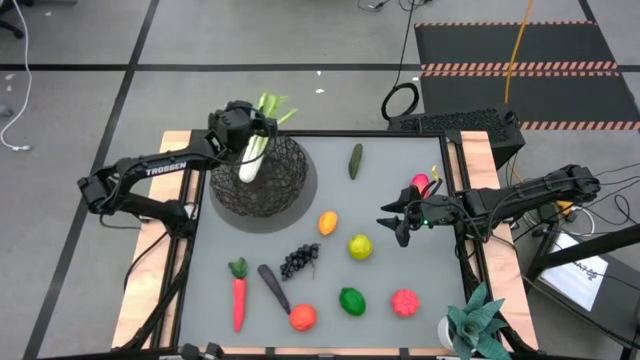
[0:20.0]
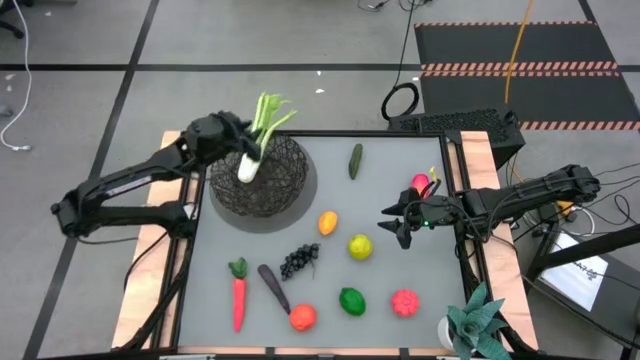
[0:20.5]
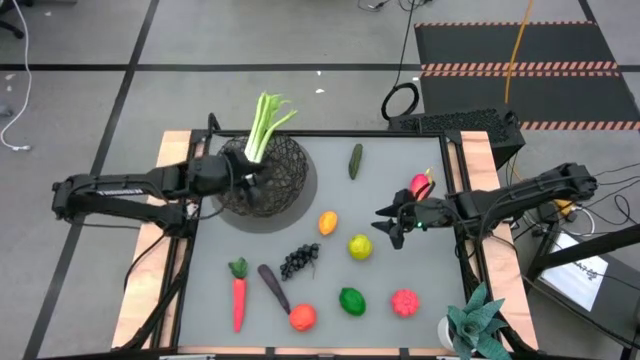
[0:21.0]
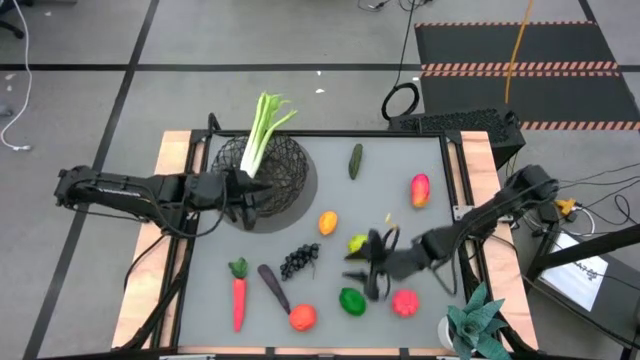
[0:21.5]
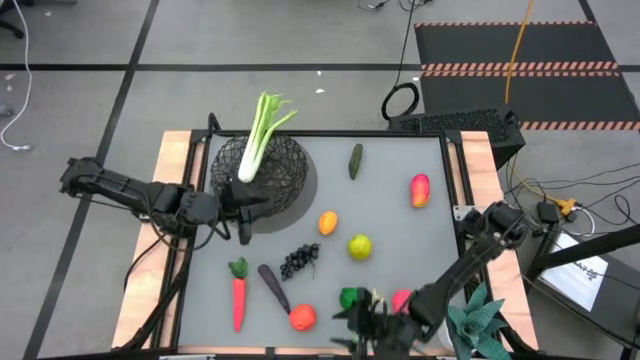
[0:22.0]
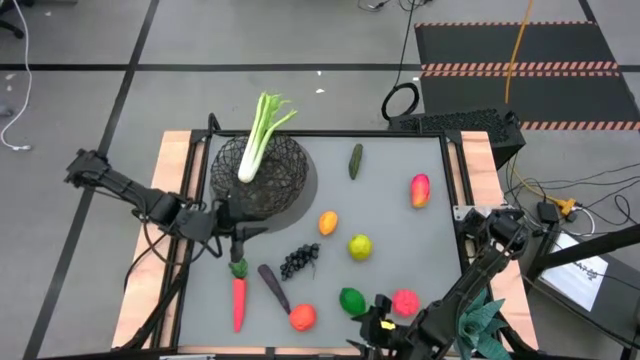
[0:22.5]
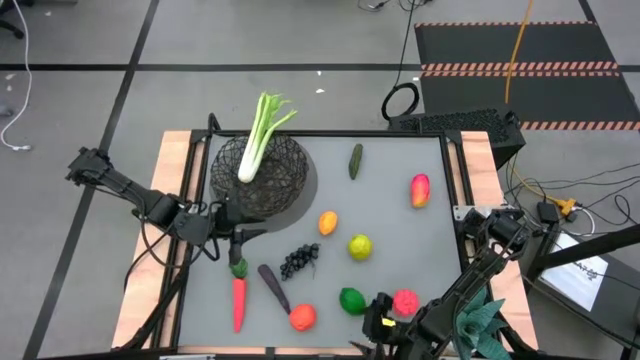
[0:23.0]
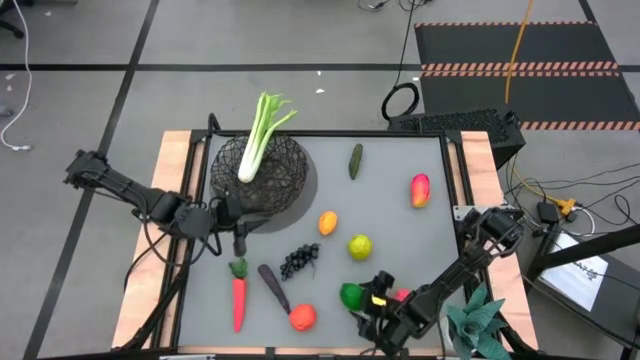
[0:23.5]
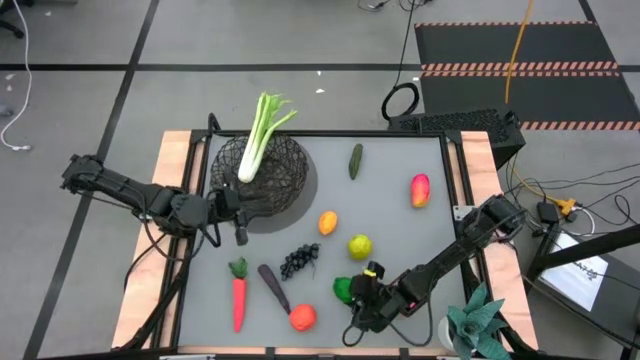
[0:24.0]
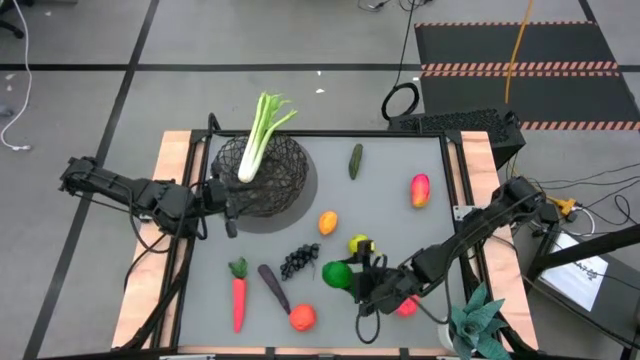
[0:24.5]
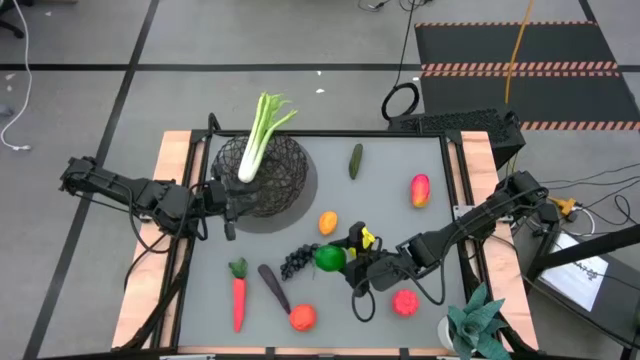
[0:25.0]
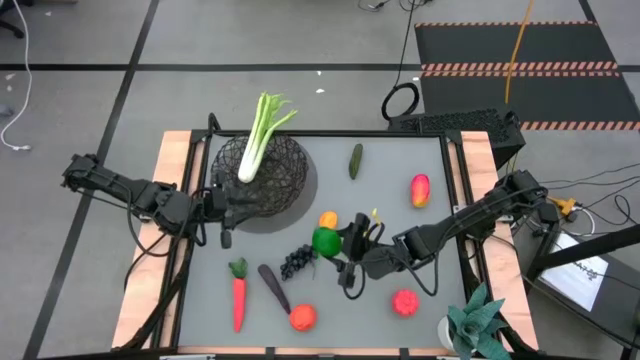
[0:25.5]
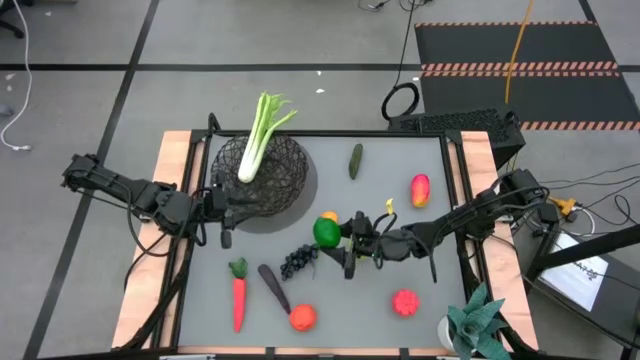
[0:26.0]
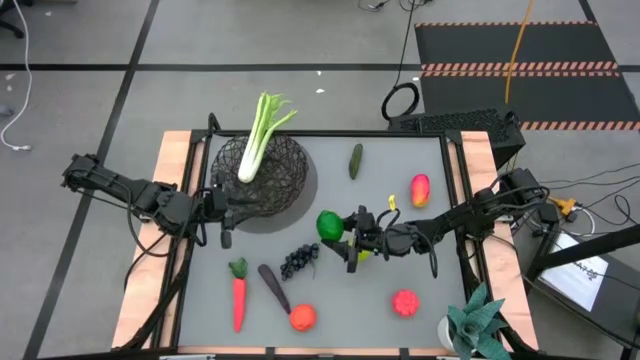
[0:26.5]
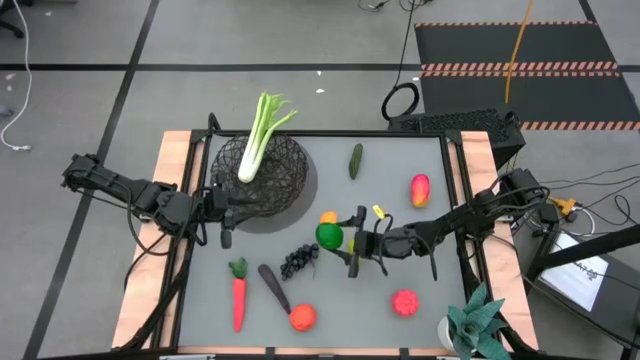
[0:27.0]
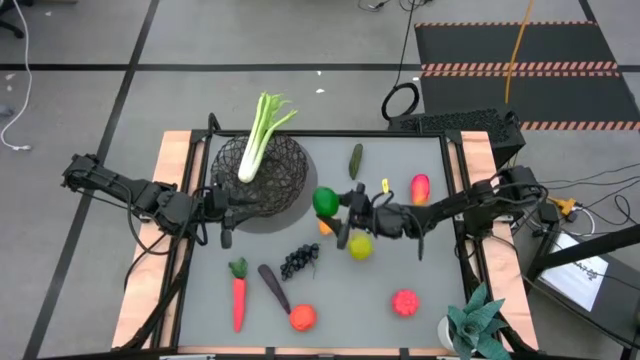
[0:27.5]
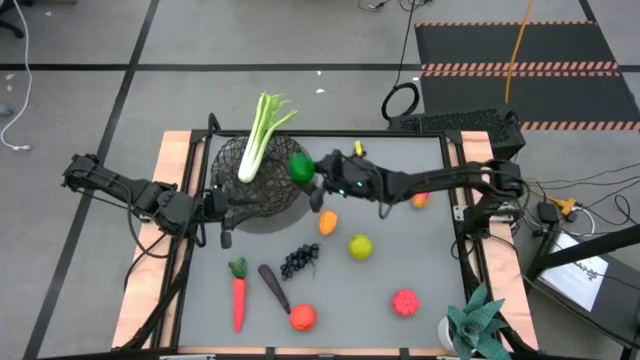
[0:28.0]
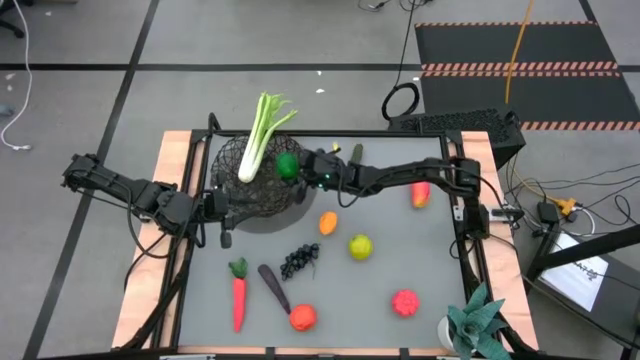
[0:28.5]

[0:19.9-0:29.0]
Task: Build produce basket
Put the green lime into the wire basket

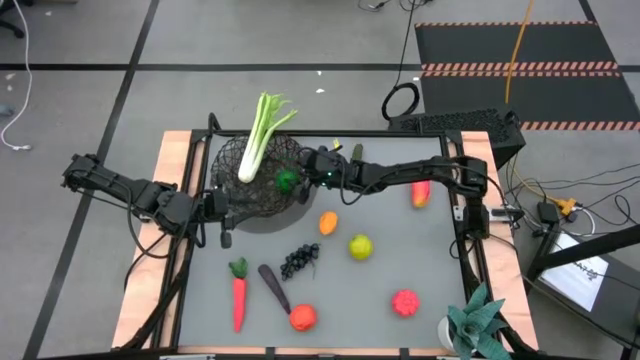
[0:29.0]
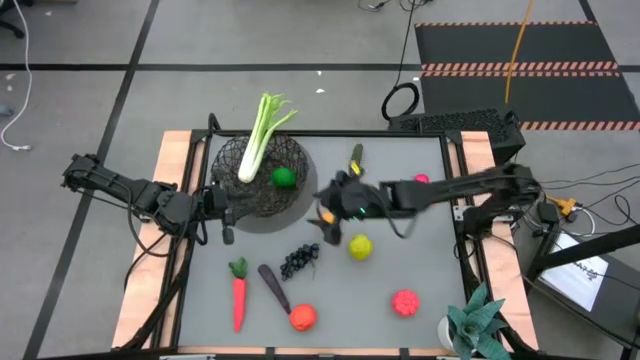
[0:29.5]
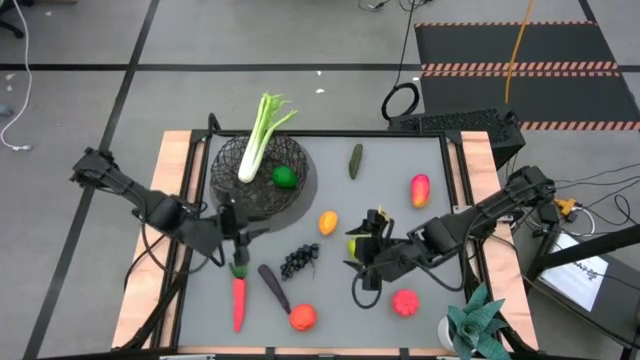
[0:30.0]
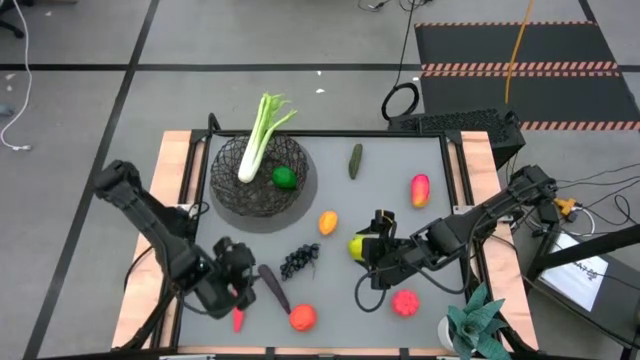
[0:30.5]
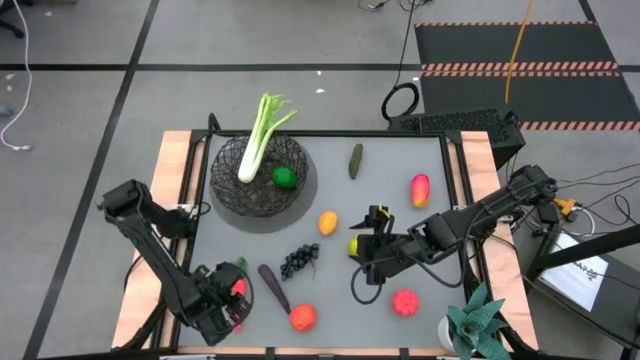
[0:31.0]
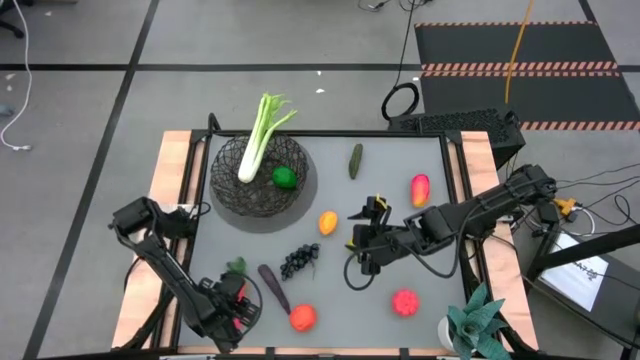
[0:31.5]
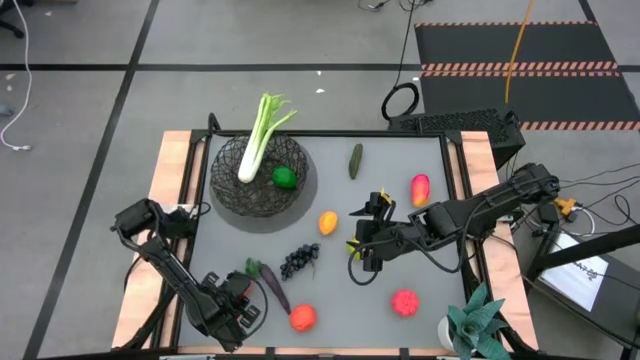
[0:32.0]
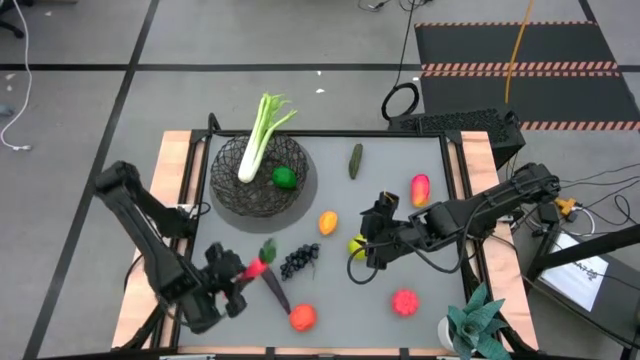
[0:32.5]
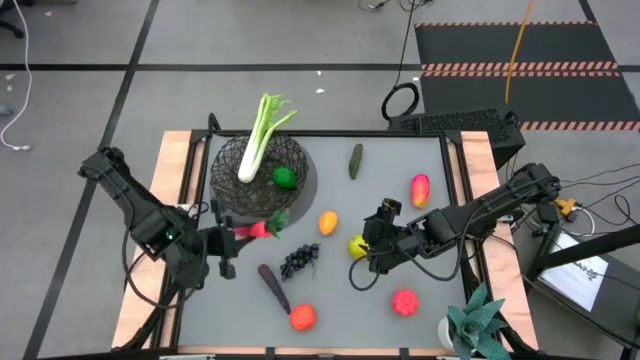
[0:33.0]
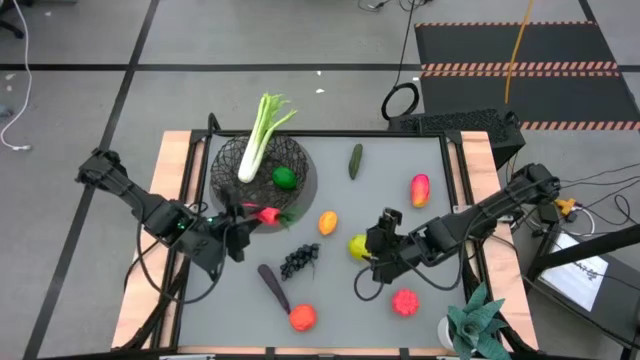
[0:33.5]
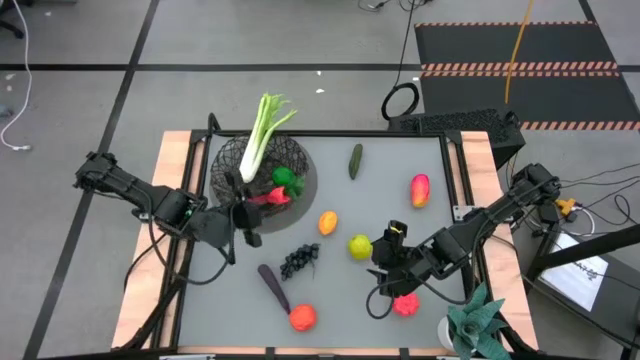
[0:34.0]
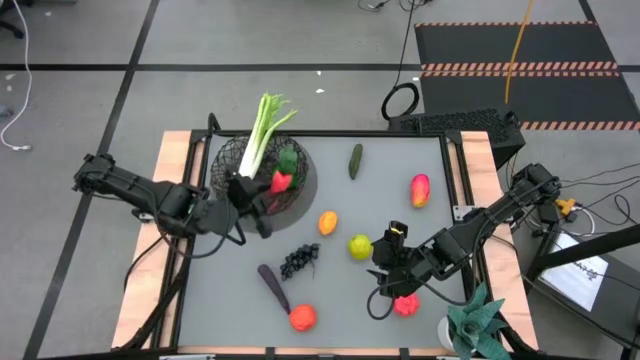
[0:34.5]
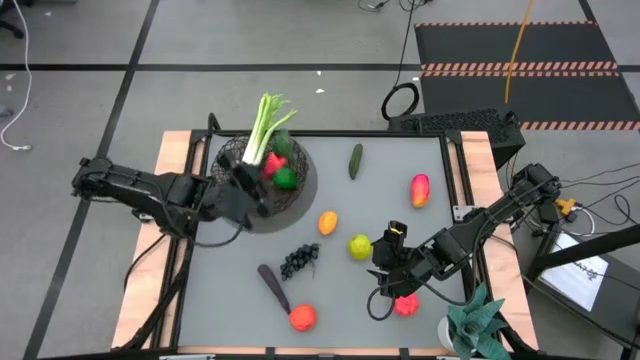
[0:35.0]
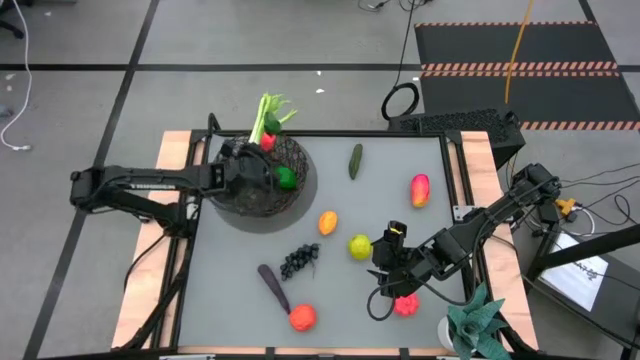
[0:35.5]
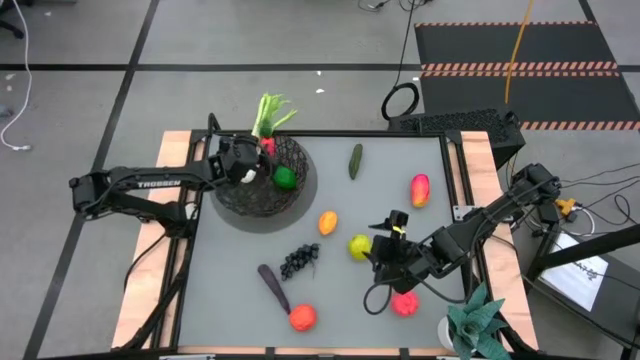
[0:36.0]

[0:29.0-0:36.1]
Put the carrot into the wire basket

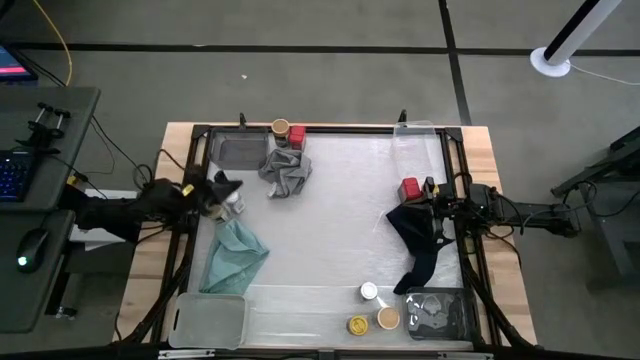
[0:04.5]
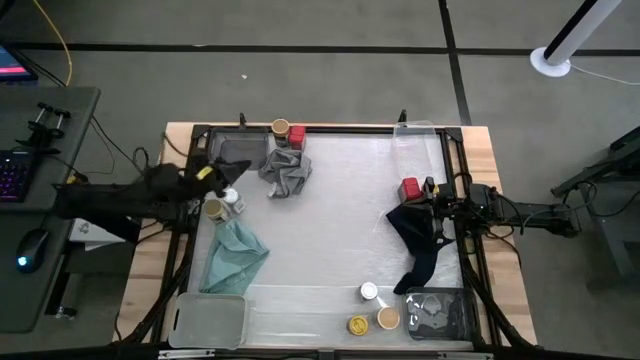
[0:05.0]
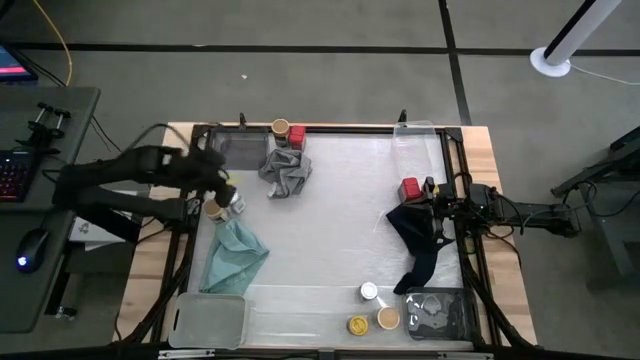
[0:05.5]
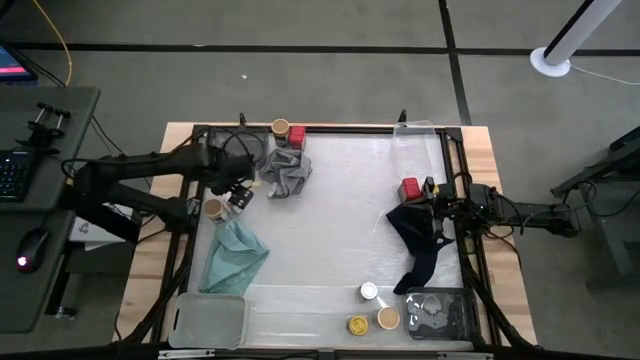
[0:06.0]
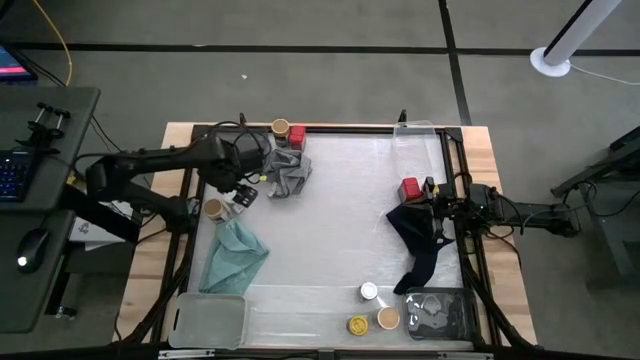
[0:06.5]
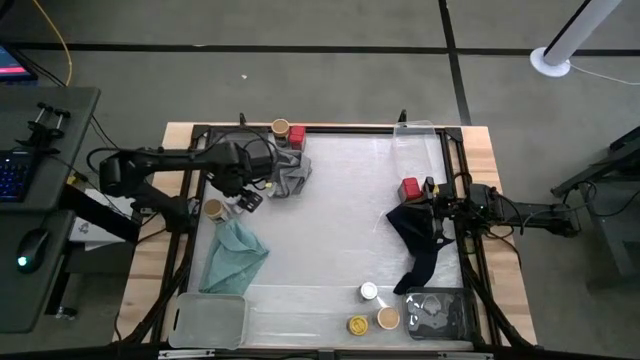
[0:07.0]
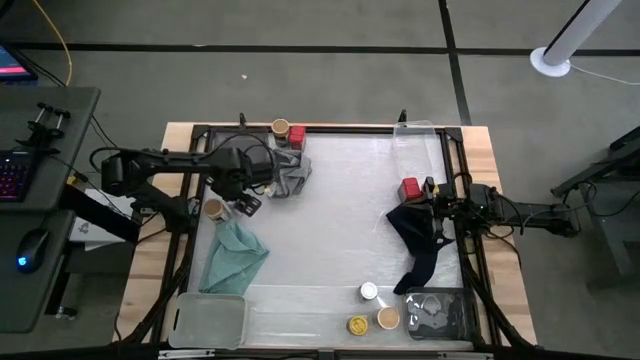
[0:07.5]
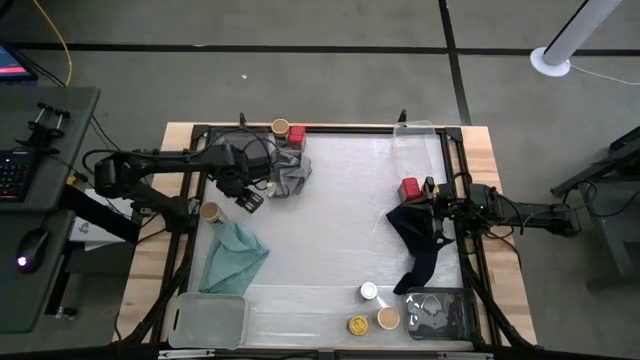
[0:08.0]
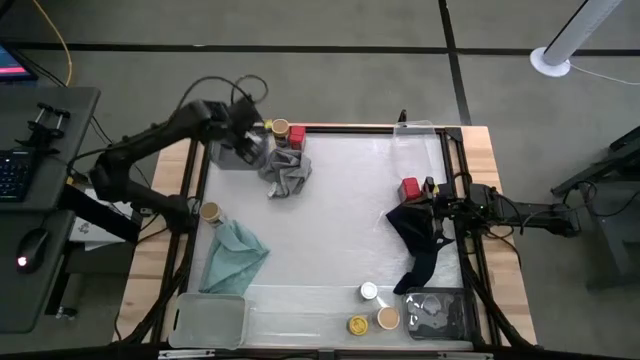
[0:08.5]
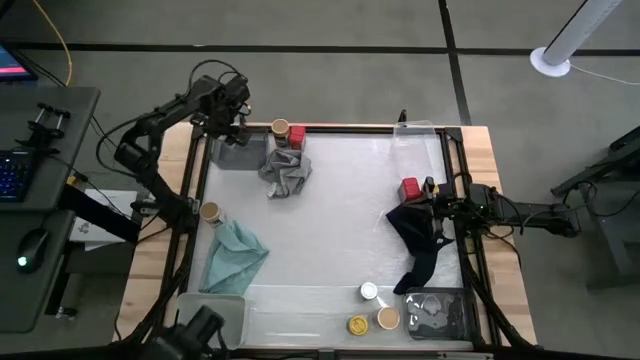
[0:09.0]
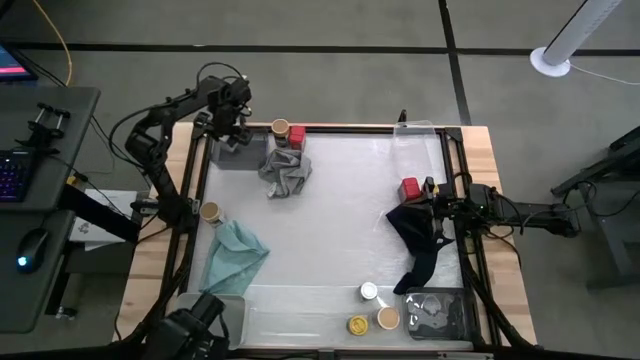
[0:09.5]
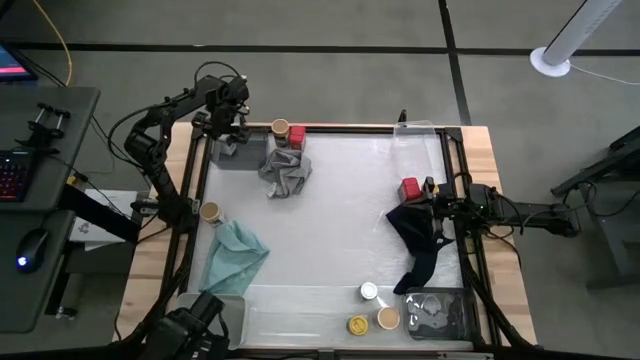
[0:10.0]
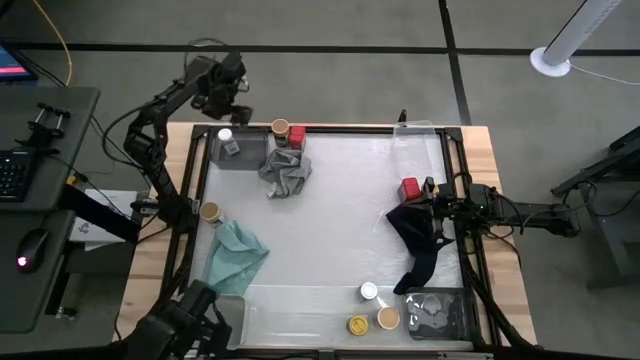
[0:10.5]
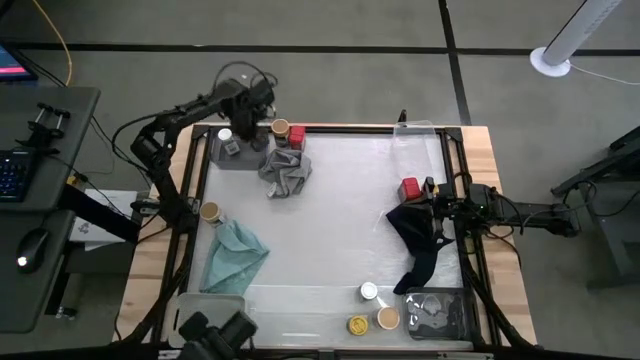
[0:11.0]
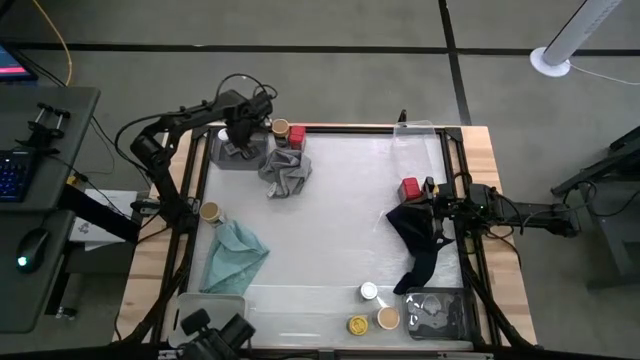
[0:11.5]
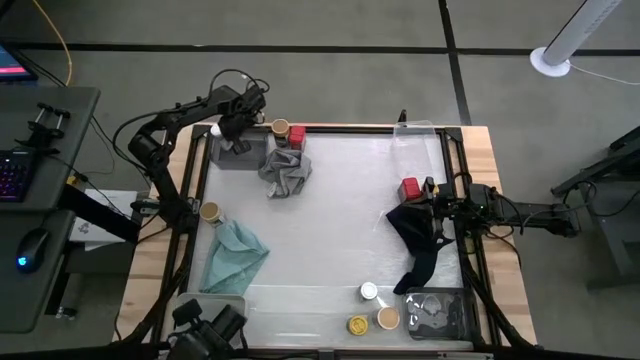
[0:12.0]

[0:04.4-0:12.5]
Task: Sort spices by type
Put the top white seasoning bottle into the top black bin
